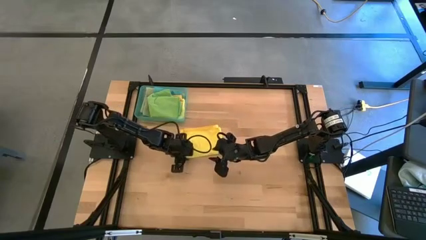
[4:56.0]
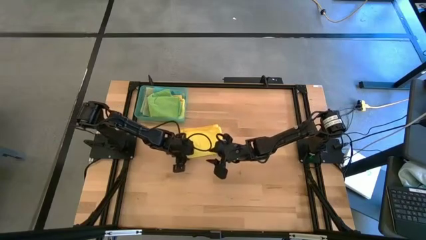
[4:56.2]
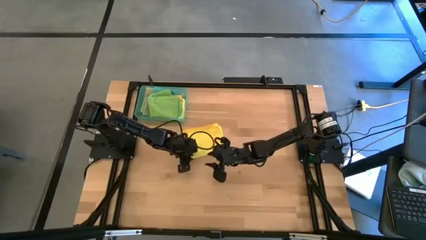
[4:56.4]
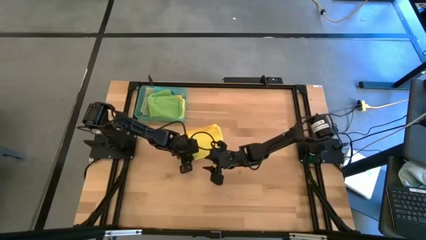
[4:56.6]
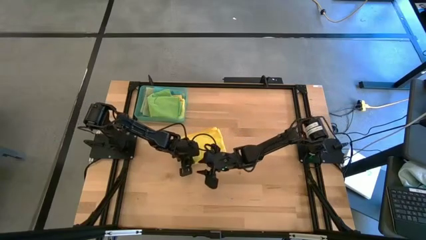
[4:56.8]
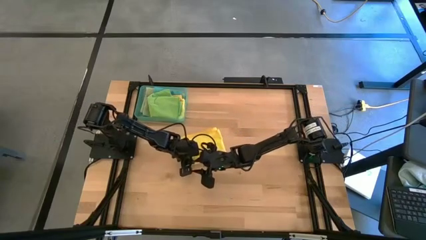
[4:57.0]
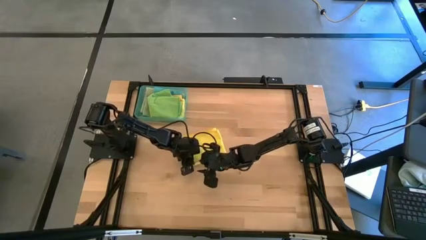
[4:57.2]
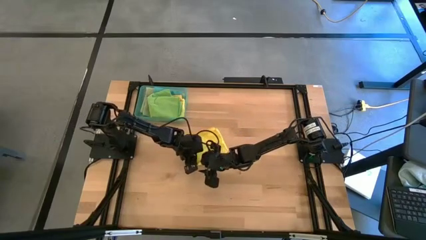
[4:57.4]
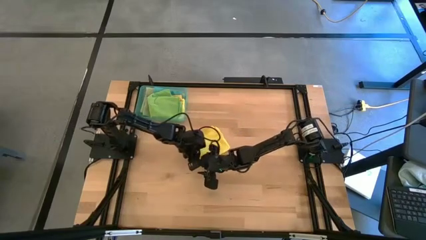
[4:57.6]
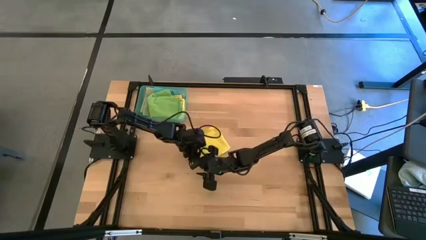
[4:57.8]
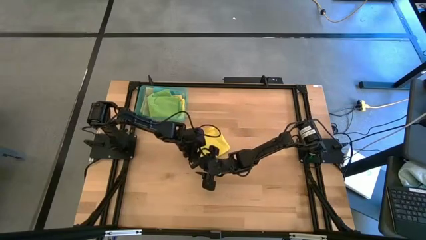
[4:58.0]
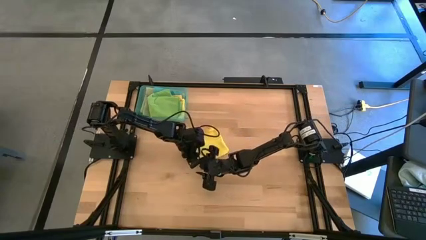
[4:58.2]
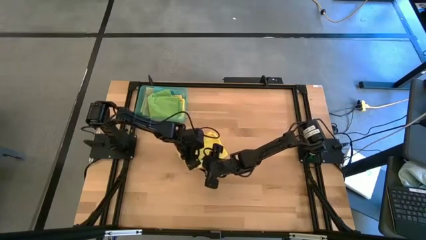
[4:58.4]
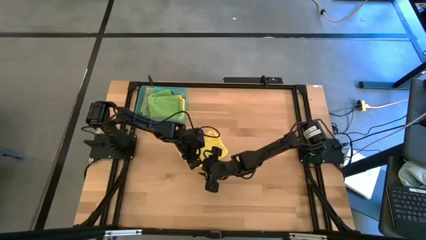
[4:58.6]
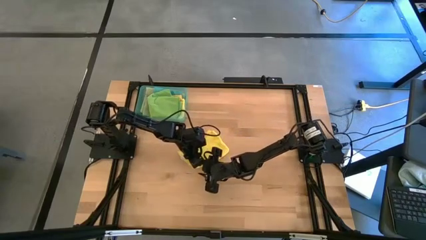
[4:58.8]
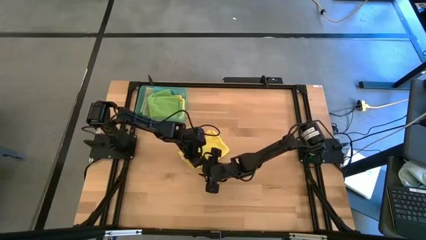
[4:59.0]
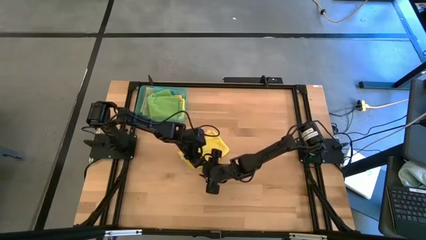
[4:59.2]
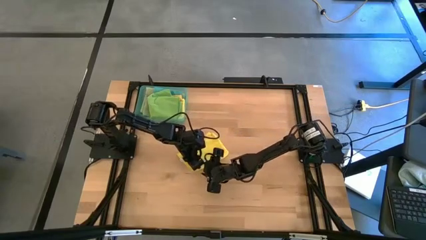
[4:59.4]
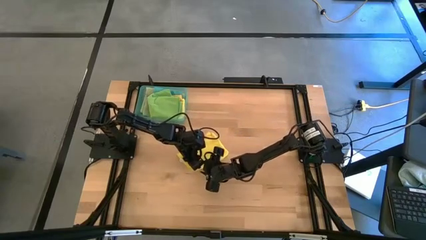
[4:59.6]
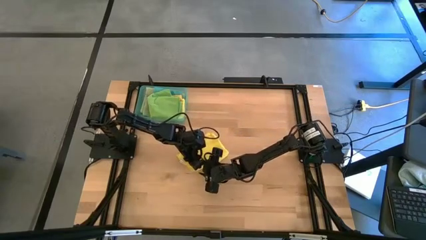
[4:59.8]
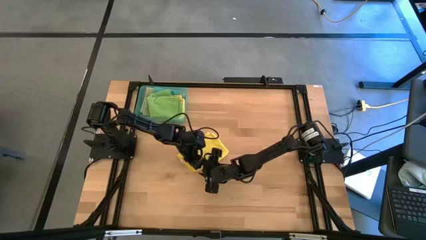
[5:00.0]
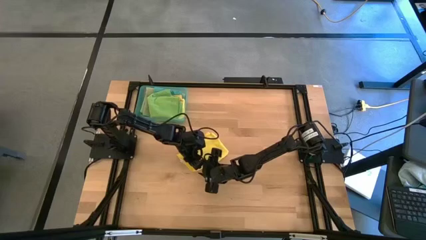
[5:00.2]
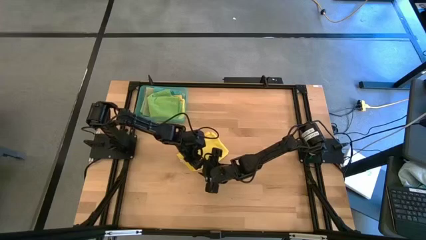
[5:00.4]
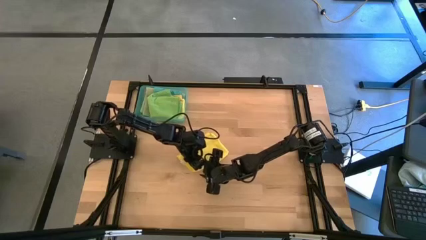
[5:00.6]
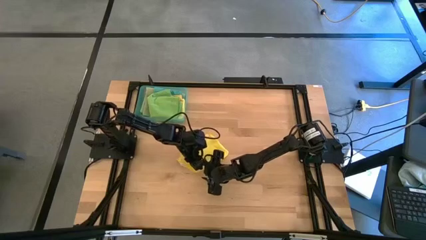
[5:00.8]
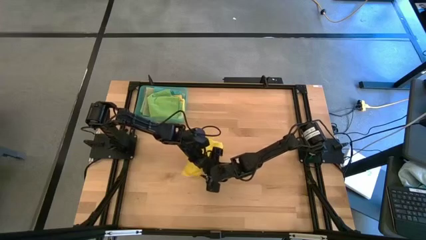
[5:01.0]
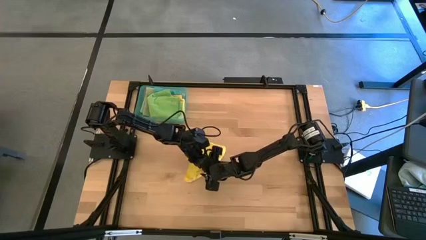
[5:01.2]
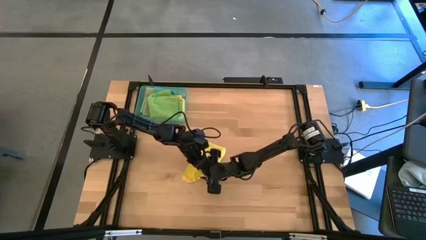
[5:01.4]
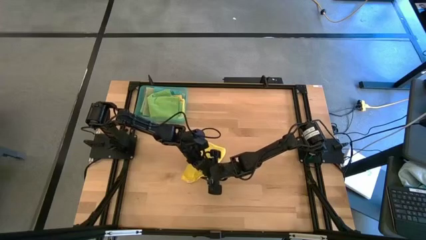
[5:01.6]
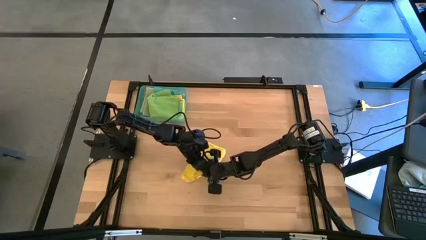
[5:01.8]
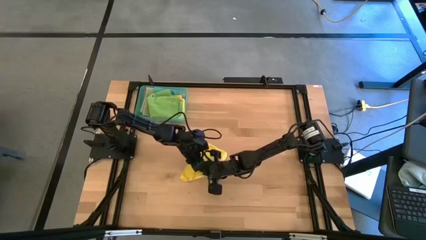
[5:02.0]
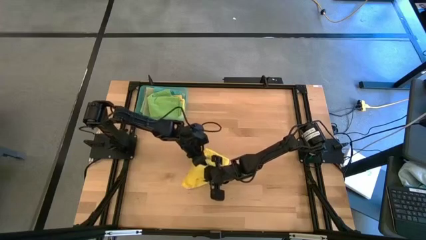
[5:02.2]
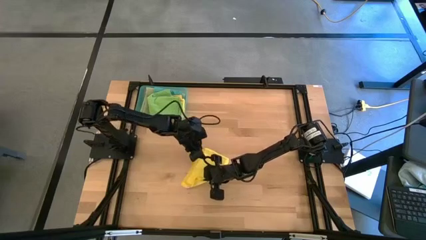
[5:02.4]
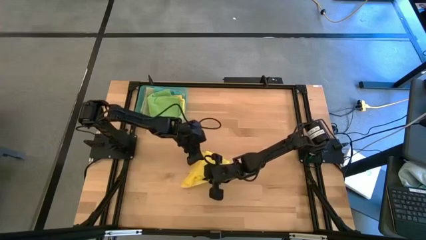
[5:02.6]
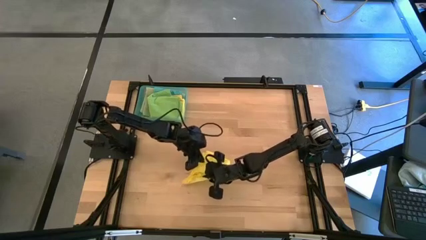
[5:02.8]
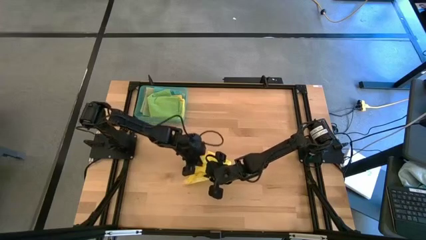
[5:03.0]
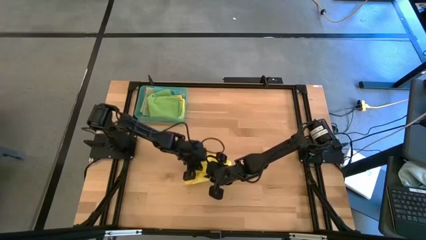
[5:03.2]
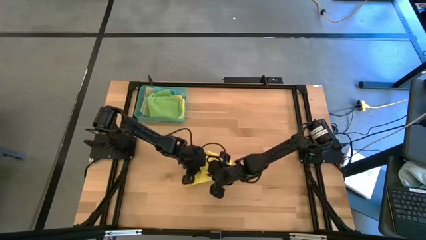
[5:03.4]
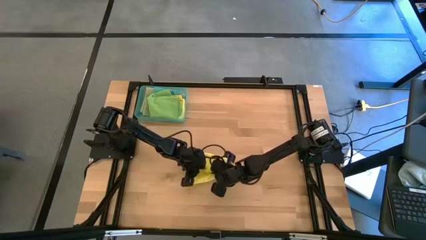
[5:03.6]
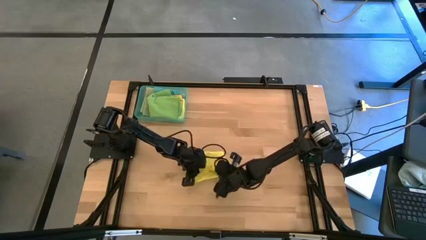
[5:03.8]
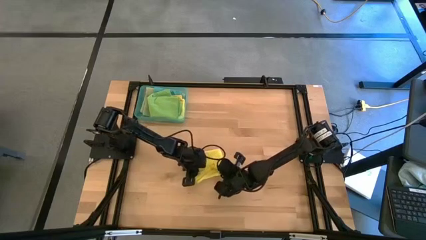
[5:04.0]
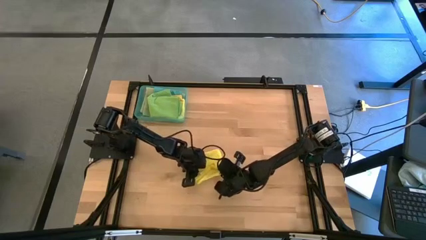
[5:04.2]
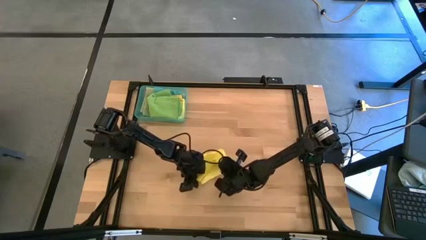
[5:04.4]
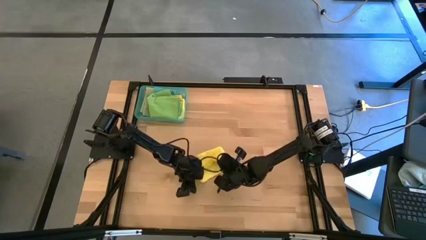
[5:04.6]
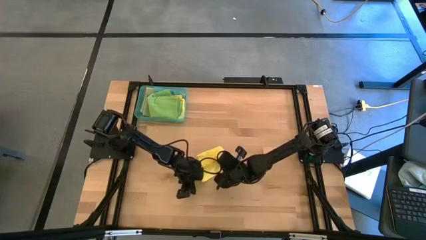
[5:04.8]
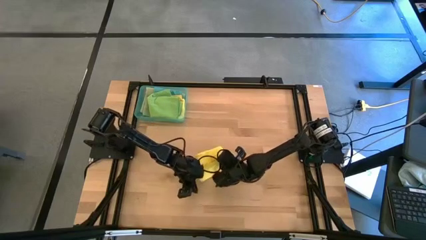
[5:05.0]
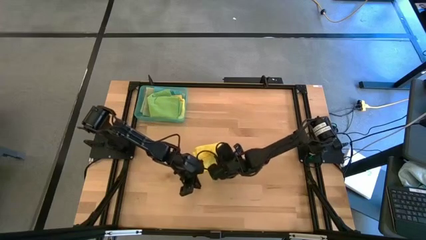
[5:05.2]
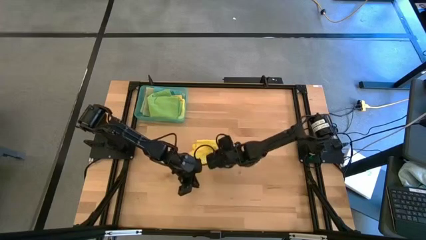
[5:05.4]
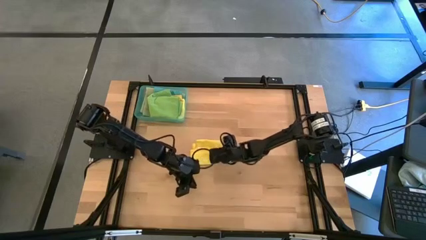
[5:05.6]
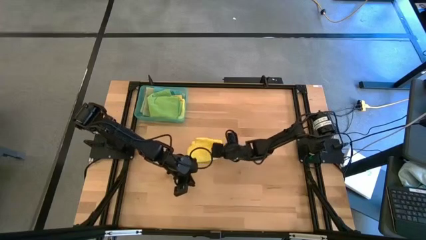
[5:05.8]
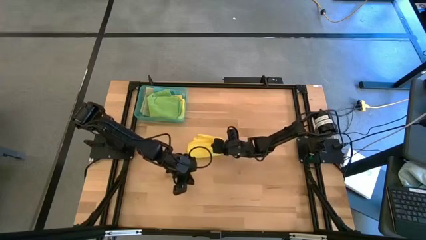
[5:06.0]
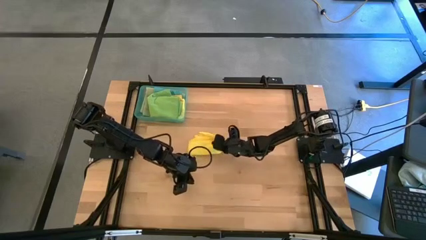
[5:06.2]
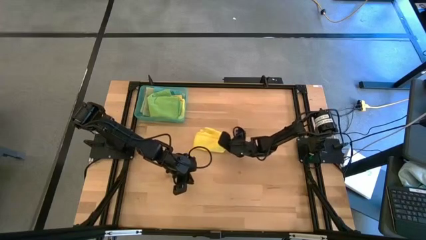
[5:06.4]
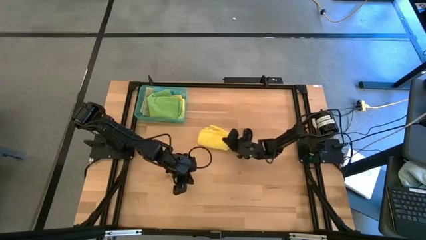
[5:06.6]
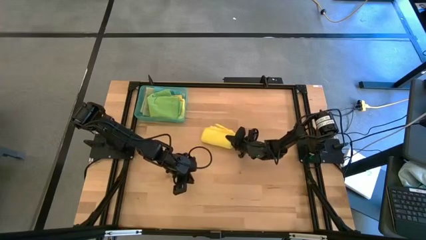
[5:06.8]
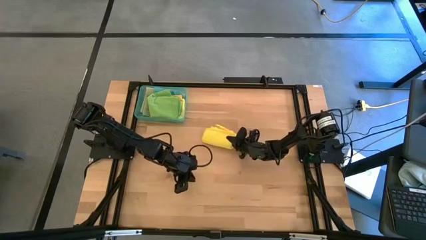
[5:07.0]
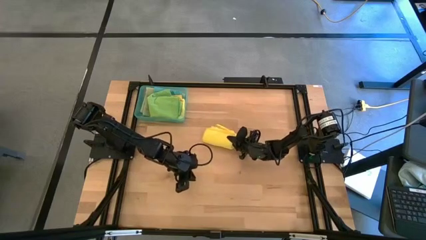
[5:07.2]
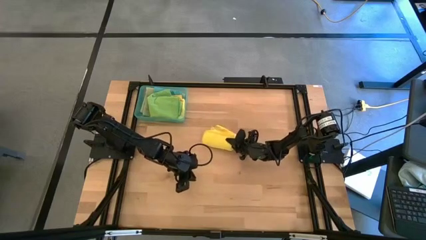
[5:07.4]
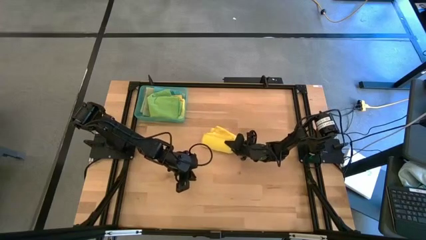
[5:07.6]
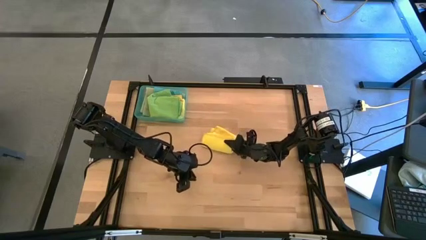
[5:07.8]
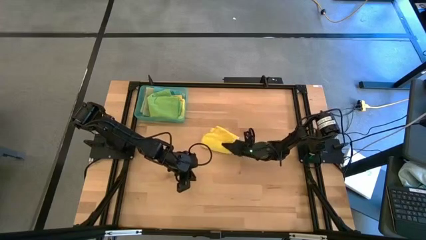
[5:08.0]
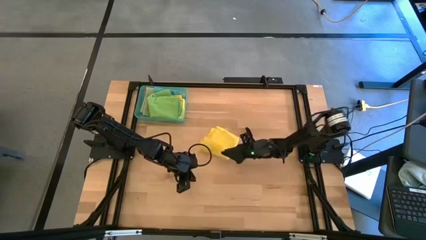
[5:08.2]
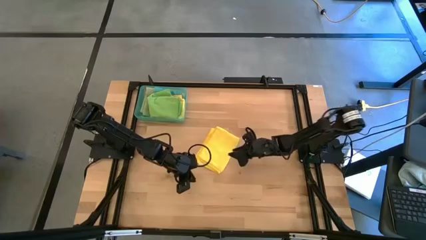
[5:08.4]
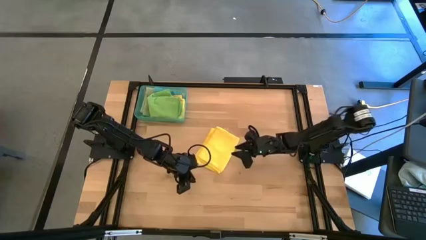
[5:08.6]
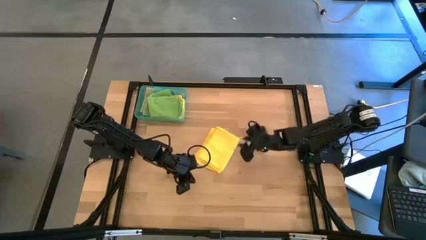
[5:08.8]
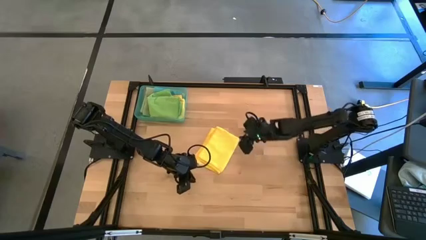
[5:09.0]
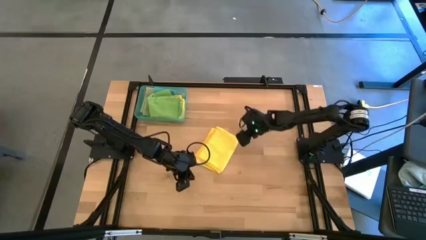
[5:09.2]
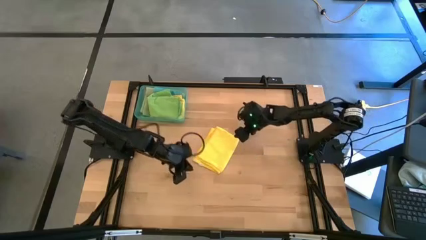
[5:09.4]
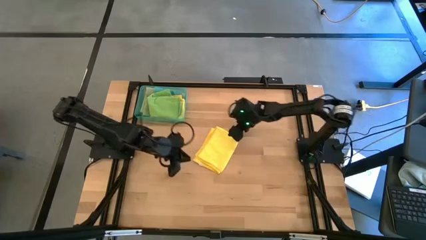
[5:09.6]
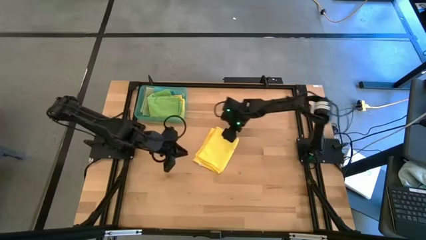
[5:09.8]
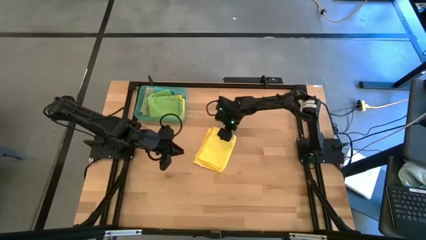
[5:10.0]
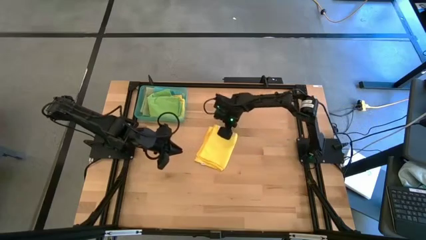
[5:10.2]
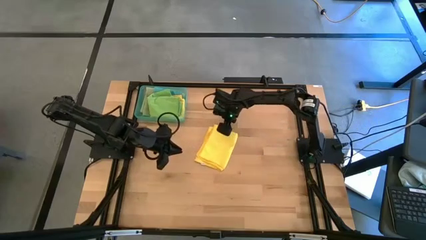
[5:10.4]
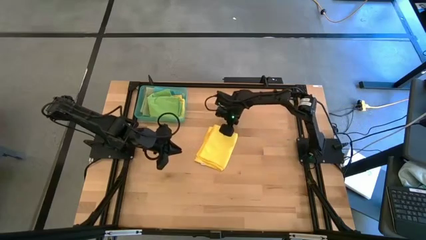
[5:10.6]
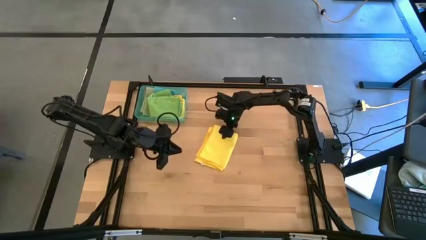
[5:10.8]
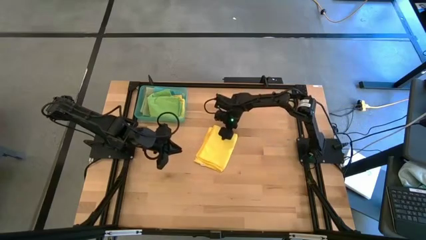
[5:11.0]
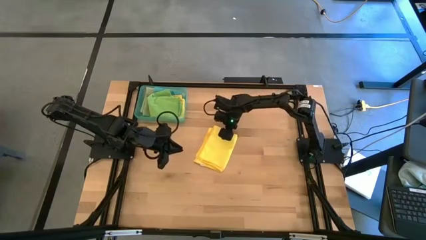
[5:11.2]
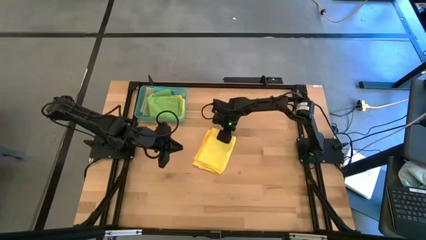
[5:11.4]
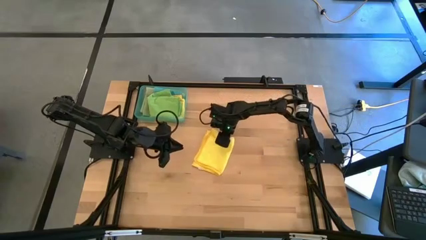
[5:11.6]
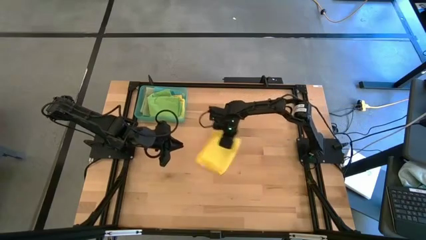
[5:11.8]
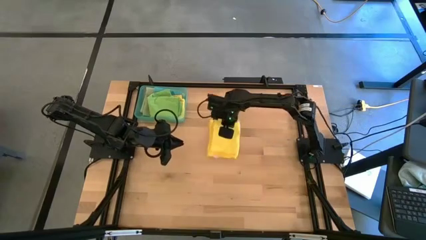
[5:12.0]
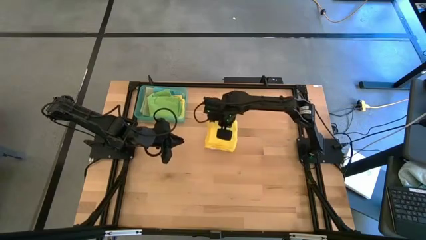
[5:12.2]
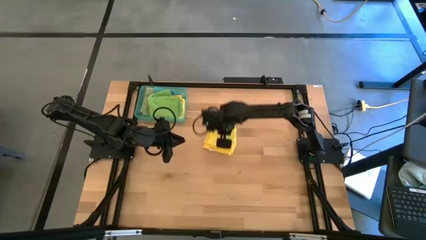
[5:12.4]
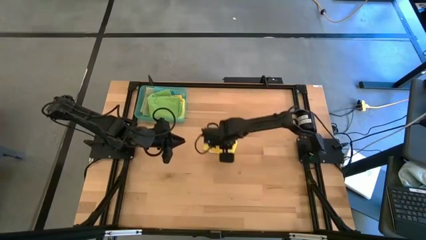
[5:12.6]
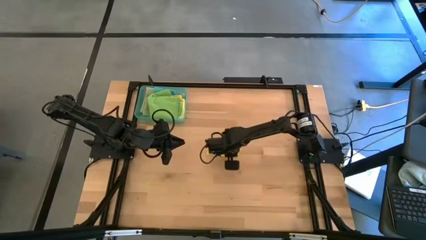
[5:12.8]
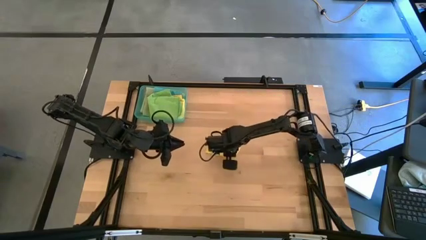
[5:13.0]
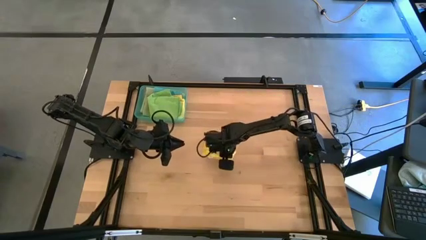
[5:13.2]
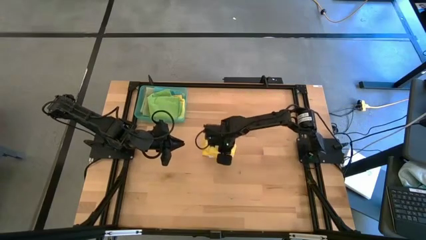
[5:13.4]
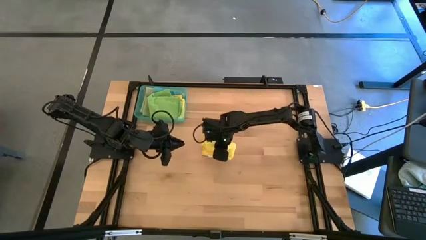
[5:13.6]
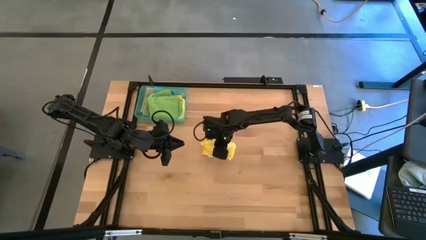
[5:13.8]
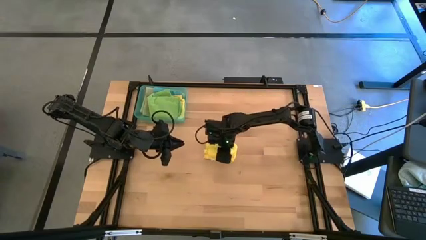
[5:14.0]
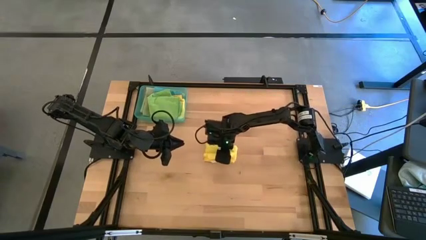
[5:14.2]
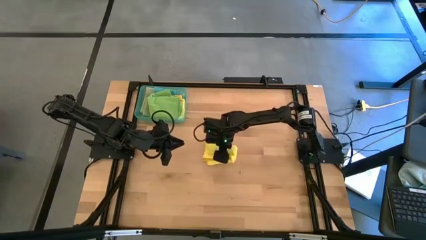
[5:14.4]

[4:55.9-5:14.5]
Task: Fold microfiber towels
Fold the yellow microfiber cloth
